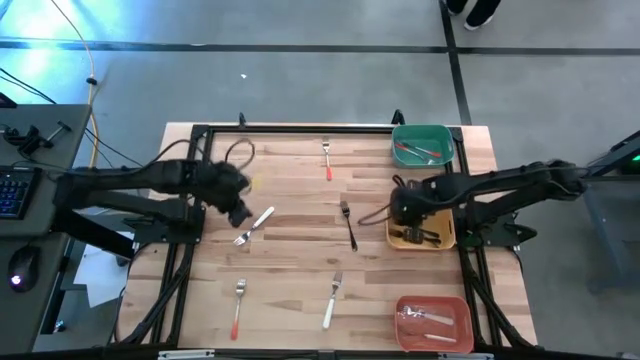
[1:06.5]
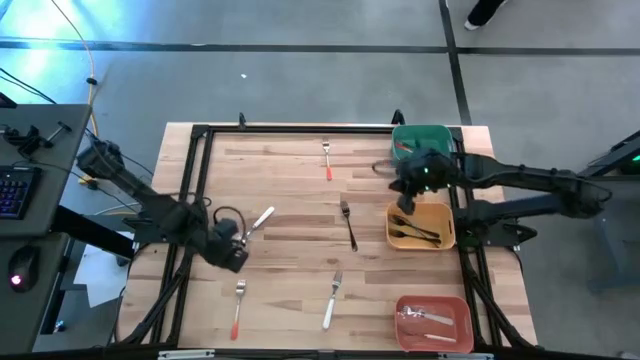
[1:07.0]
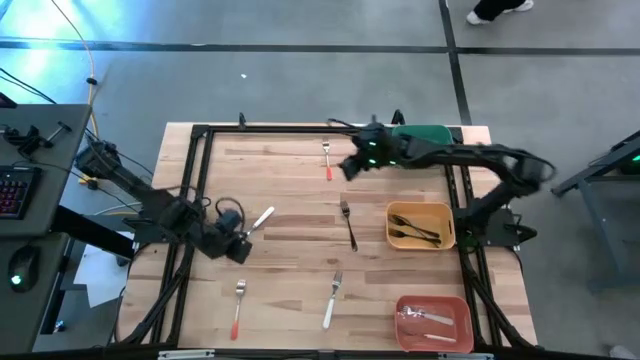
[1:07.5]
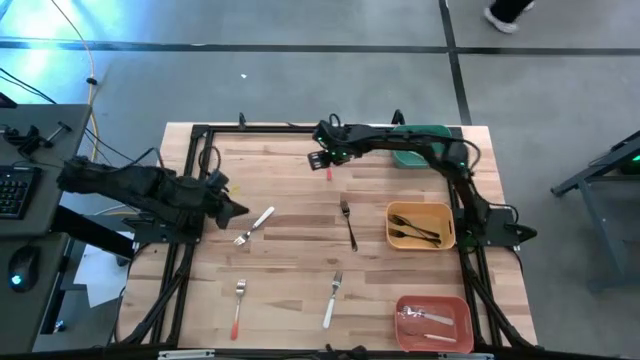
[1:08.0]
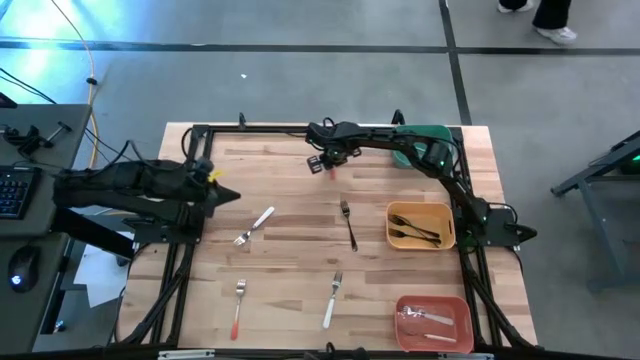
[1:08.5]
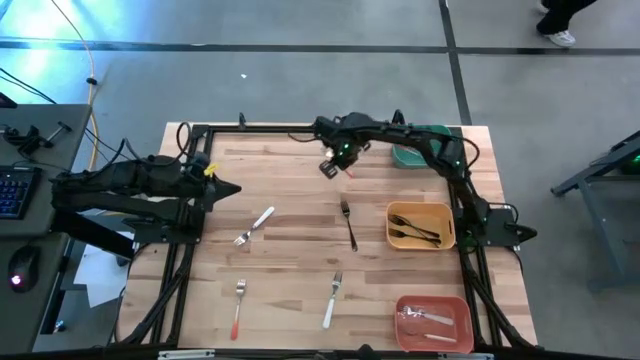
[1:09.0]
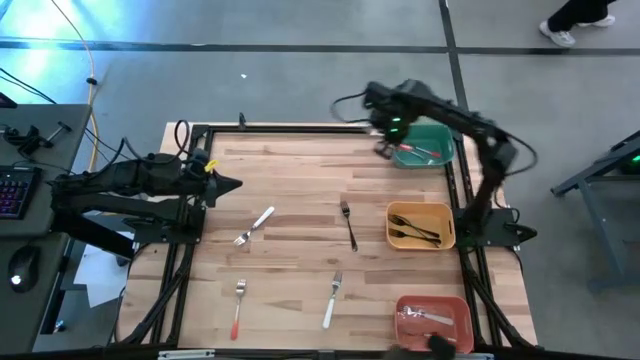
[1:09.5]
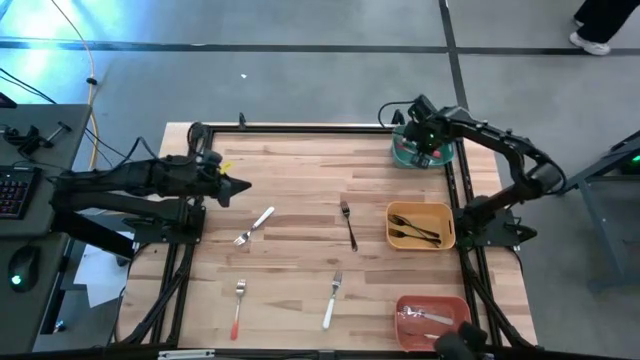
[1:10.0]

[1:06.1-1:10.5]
Task: Sort silverware by color (type)
Put the orange fork into the green bin

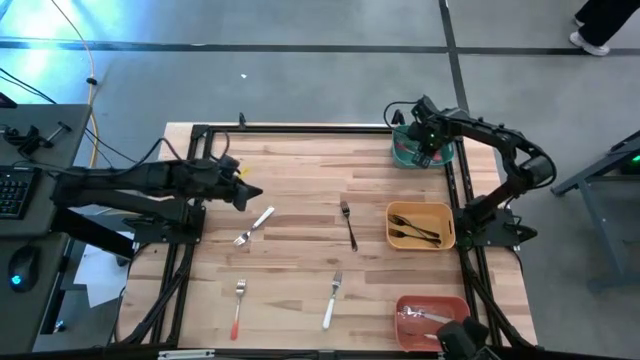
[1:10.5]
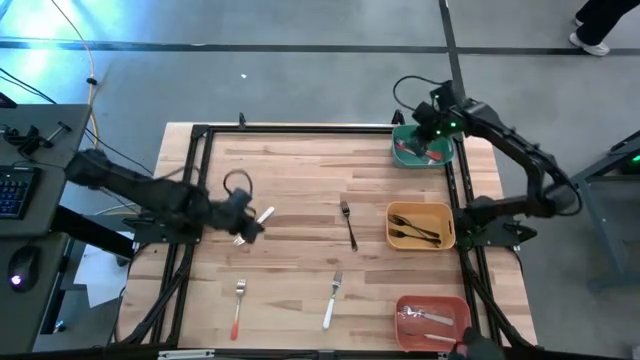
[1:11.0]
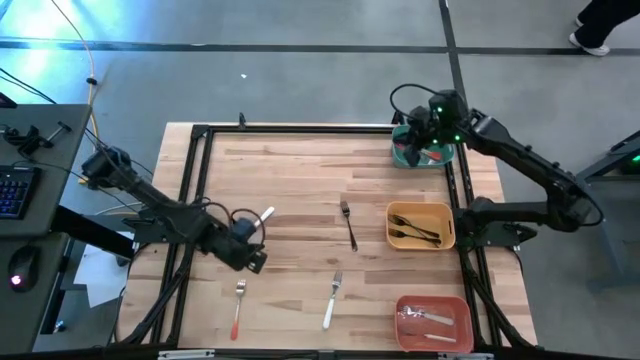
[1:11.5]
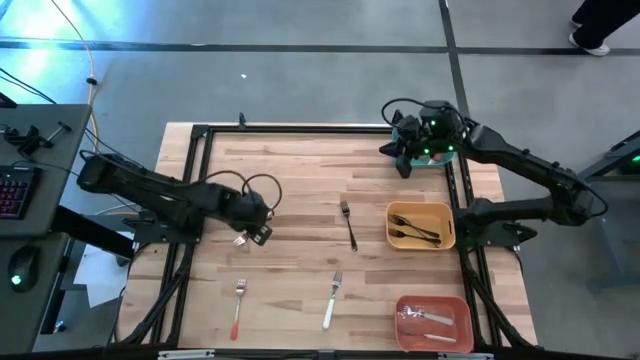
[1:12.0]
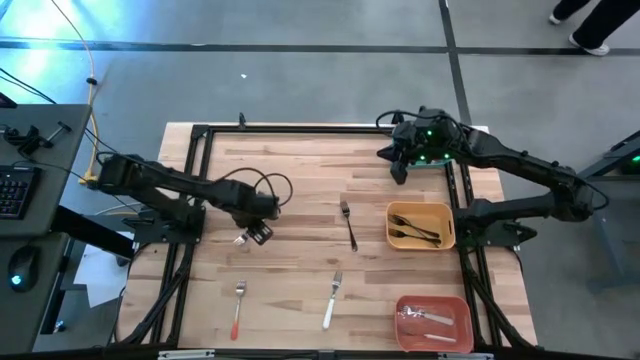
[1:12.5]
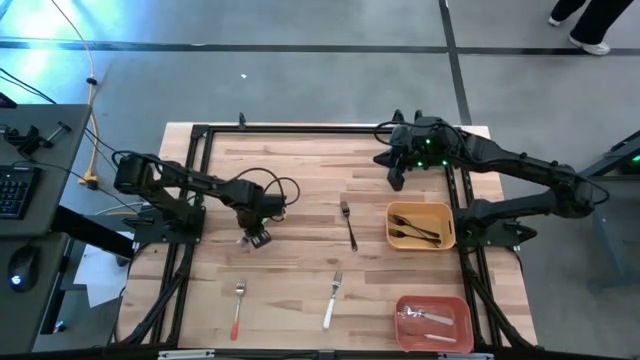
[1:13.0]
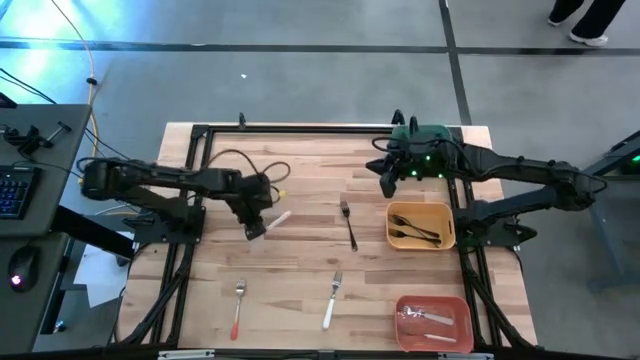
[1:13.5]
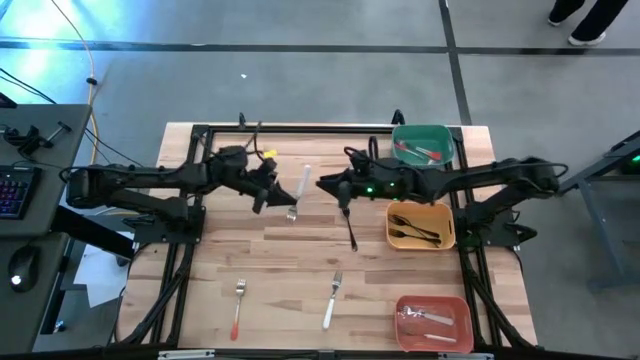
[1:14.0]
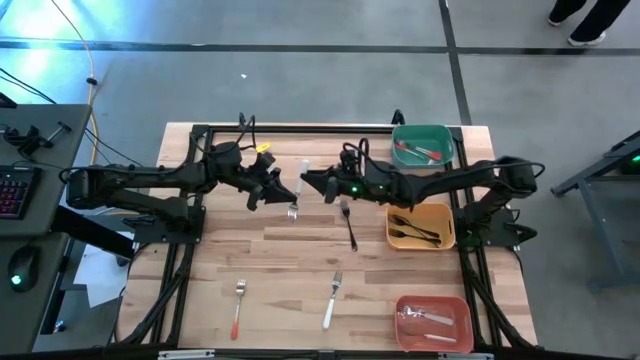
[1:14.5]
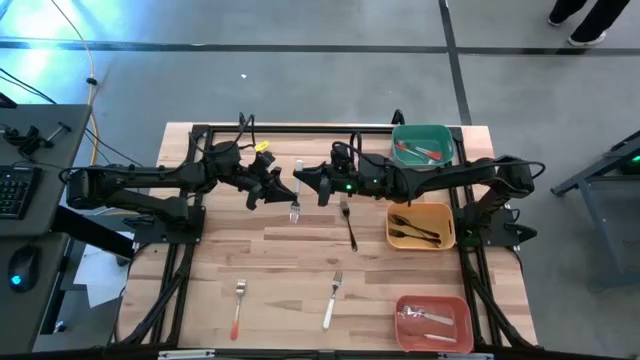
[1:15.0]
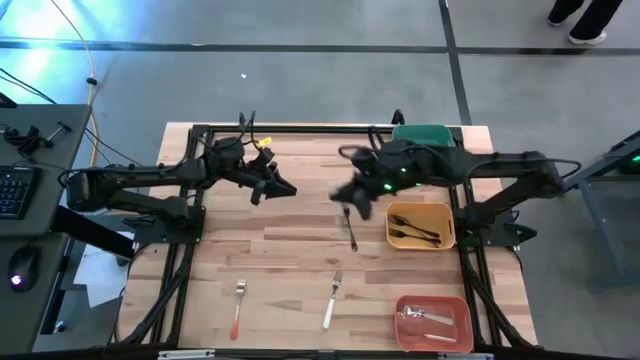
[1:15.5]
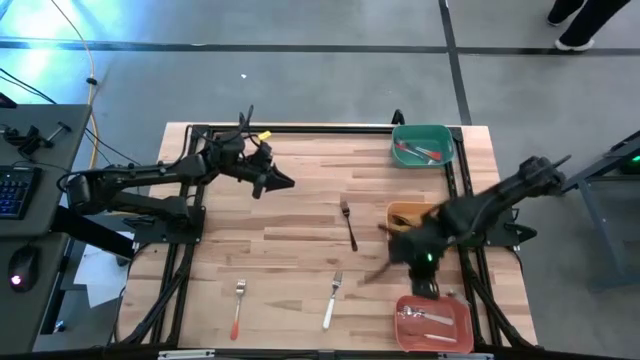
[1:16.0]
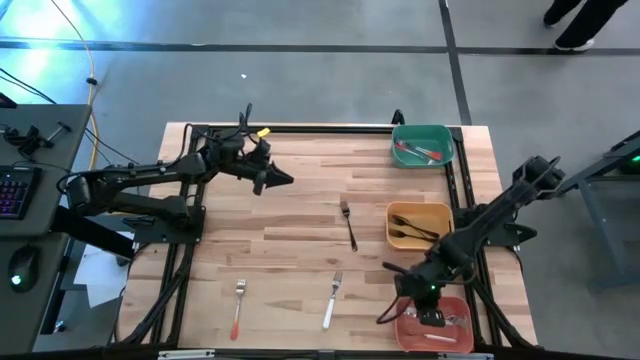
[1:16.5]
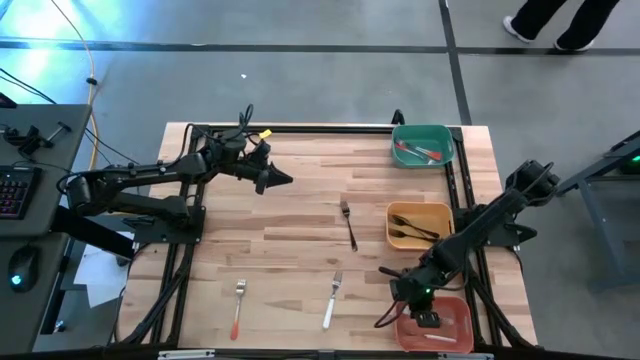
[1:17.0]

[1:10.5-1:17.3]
Put the white fork into the orange bin

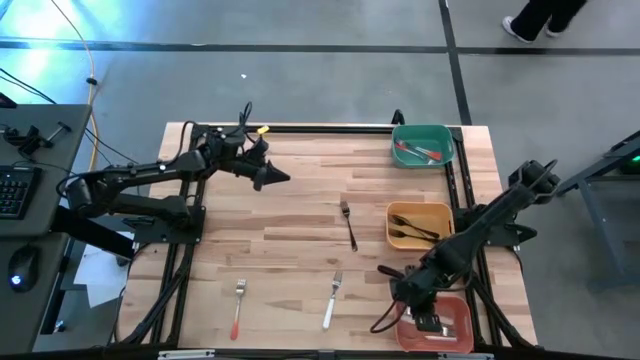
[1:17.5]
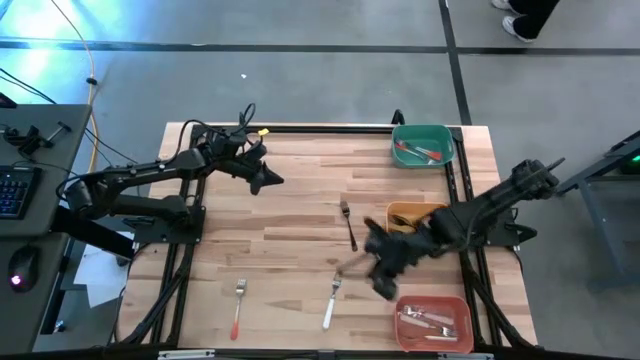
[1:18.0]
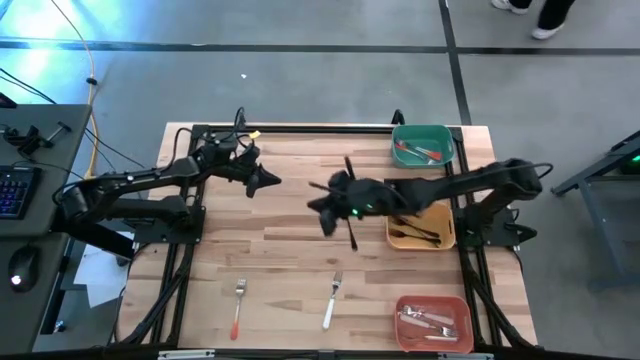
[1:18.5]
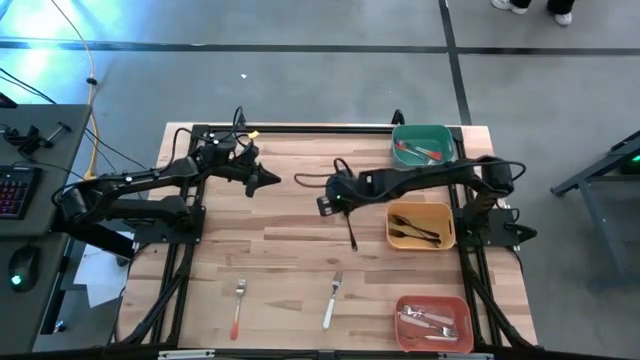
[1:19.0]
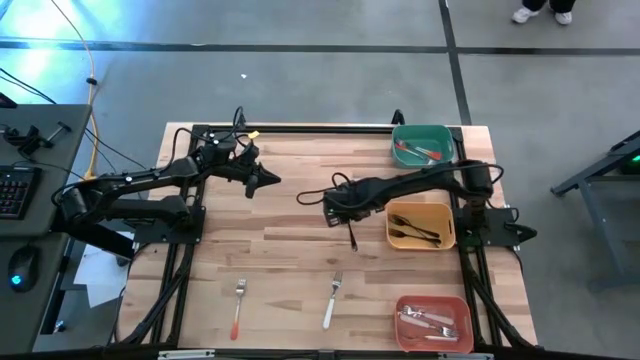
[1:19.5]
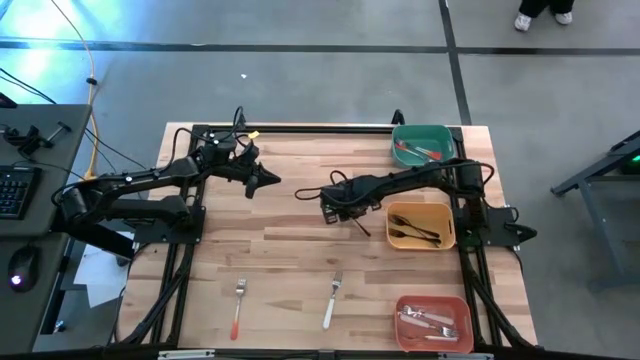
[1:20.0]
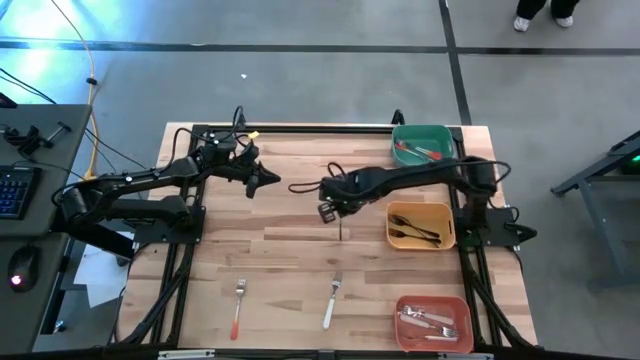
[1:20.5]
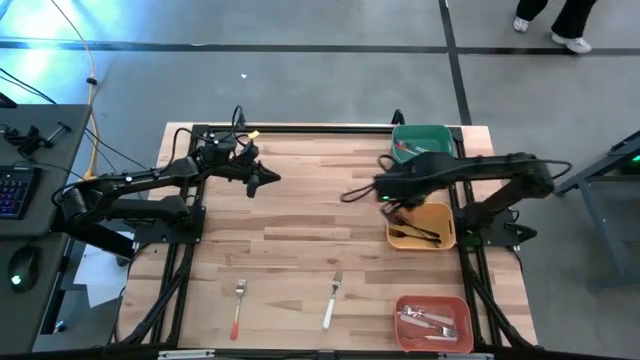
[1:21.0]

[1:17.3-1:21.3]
Put the black fork into the yellow bin

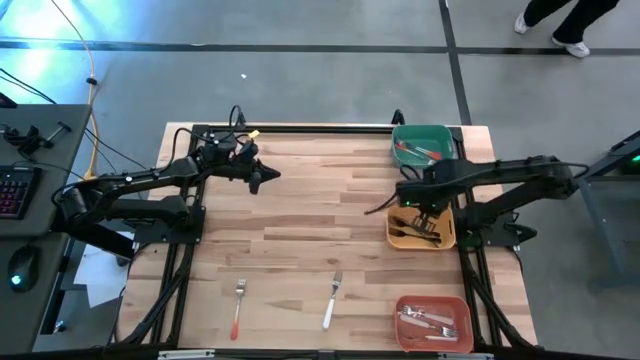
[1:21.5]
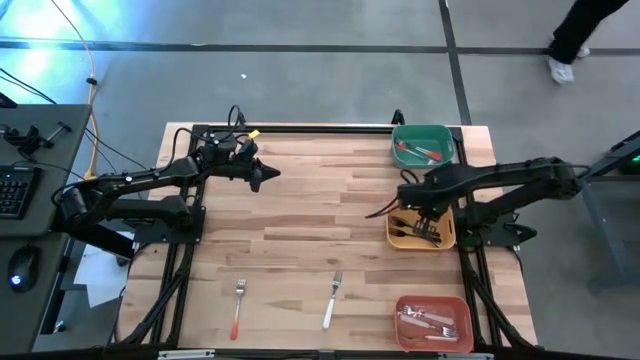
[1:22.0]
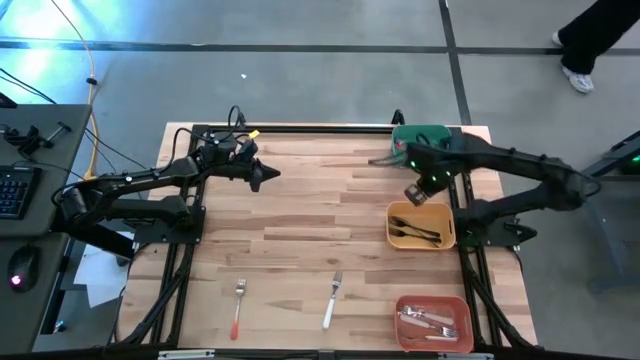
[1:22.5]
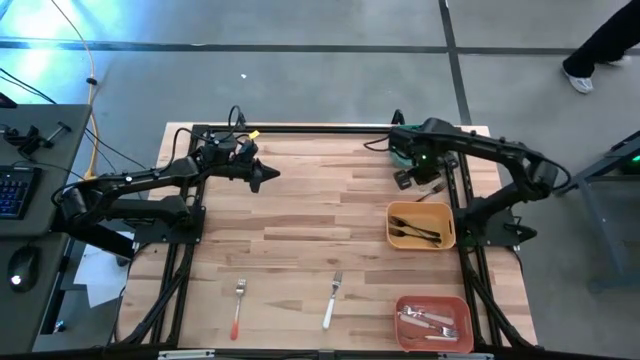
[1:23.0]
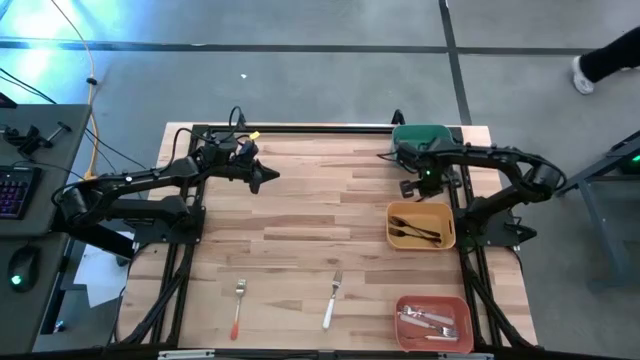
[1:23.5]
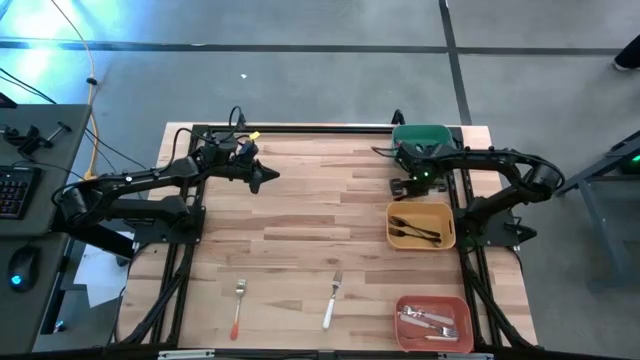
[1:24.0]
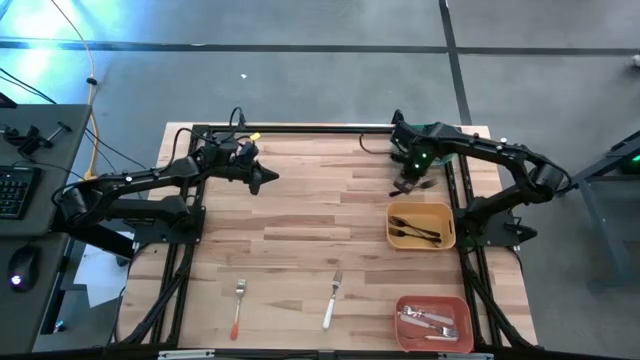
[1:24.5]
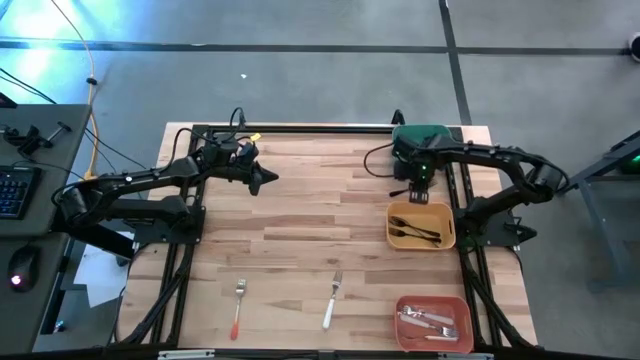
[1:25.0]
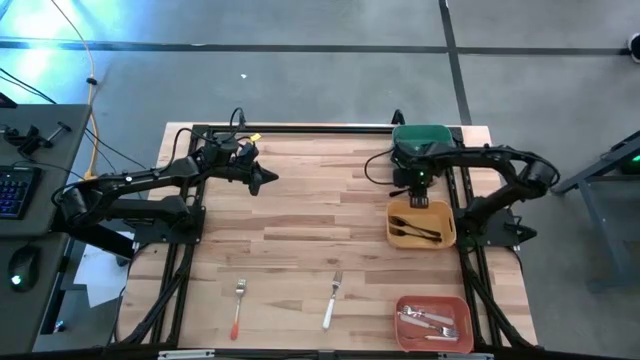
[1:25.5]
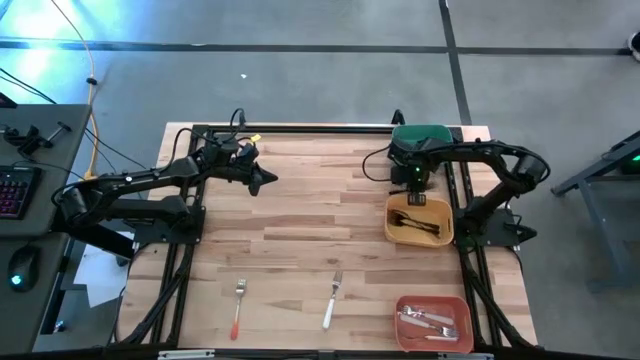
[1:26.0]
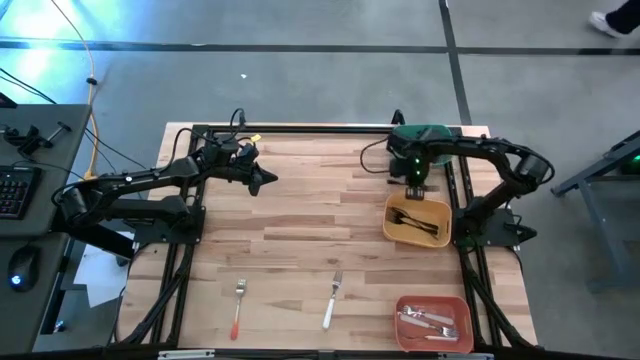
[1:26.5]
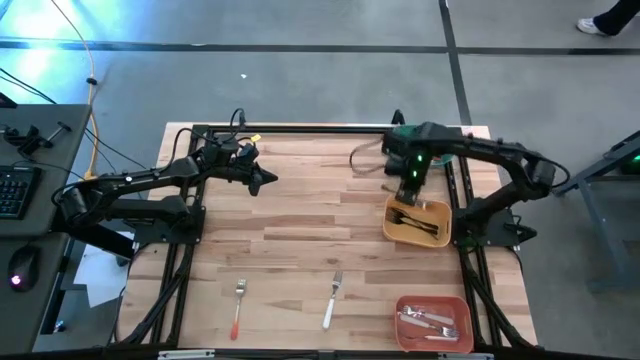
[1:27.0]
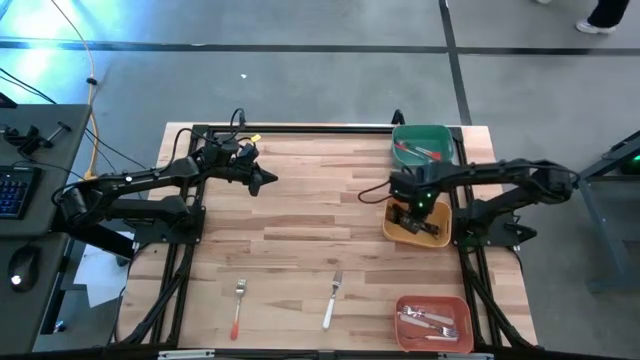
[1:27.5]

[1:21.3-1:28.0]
Put the black fork into the yellow bin

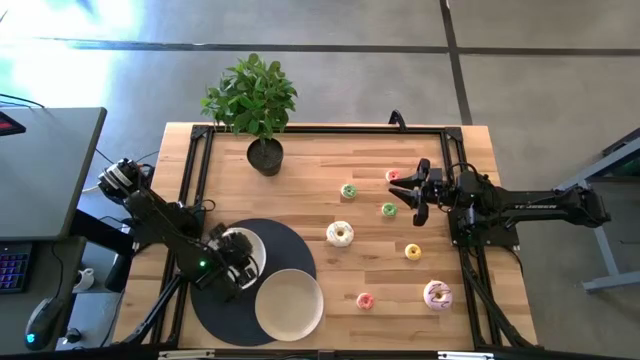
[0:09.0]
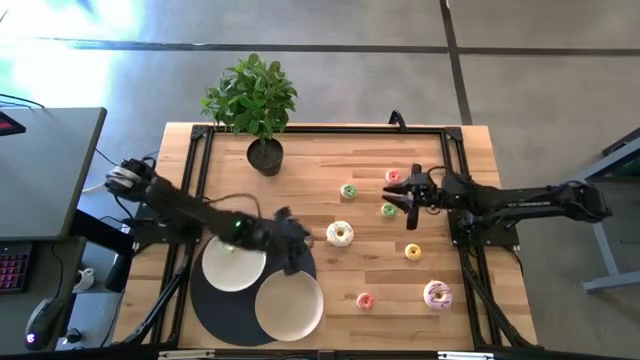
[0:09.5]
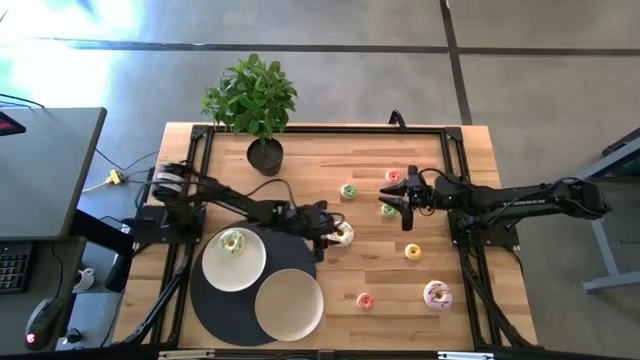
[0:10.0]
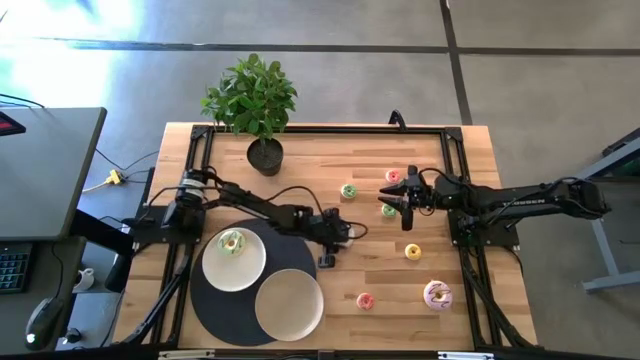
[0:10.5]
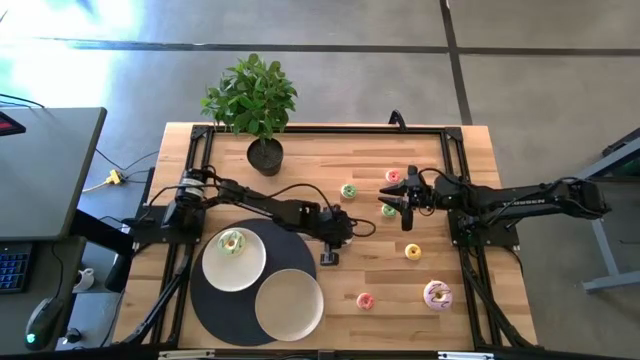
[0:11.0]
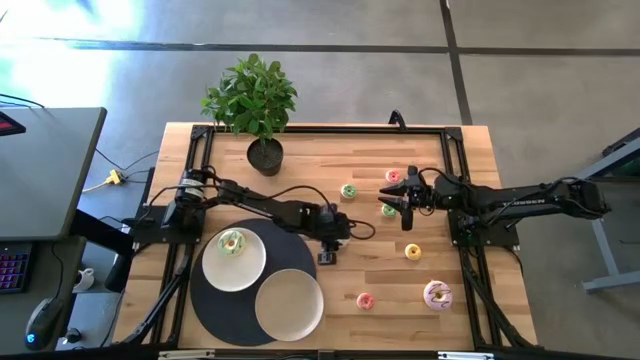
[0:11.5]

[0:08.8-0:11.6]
Task: Pick & Place donuts
Put the large white donut on the white plate
